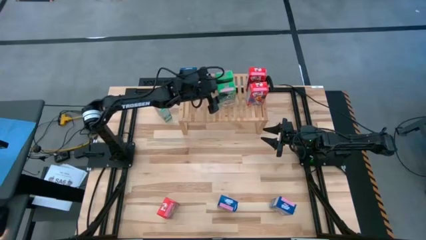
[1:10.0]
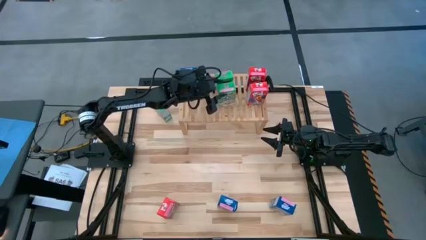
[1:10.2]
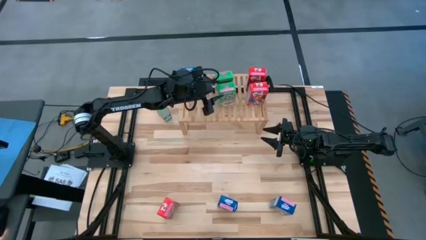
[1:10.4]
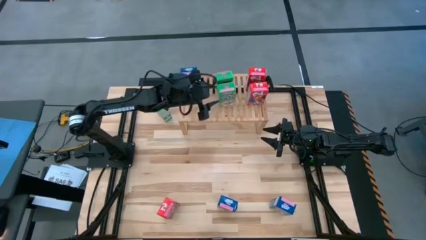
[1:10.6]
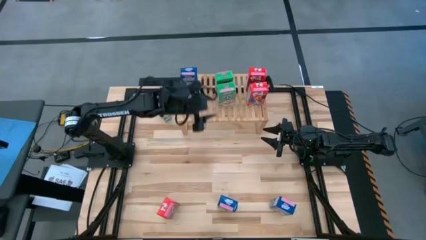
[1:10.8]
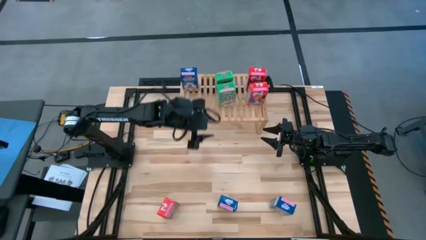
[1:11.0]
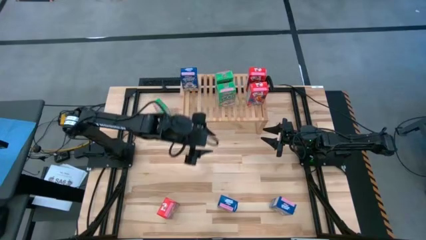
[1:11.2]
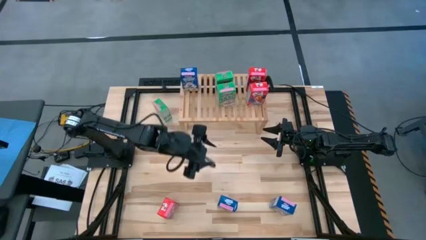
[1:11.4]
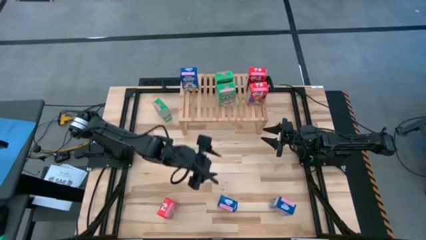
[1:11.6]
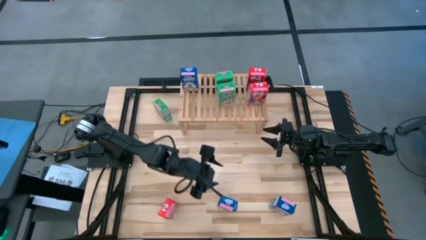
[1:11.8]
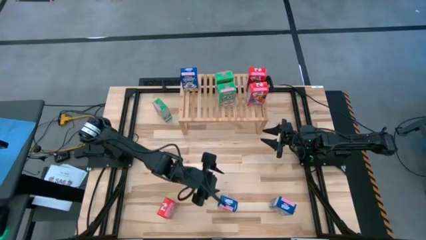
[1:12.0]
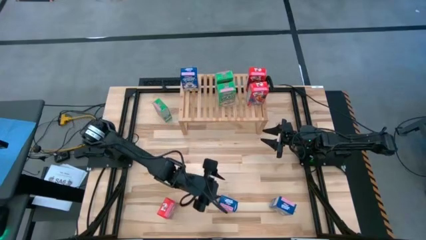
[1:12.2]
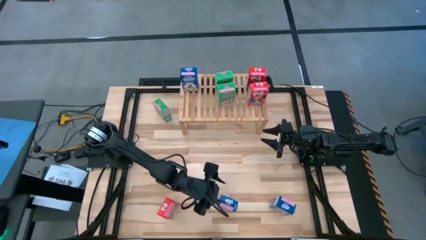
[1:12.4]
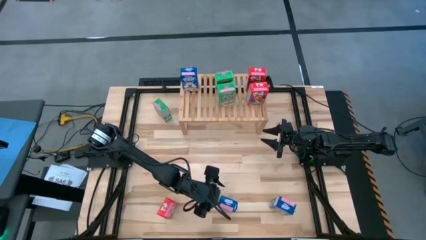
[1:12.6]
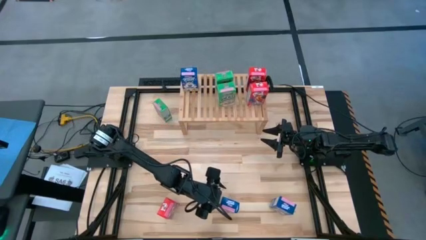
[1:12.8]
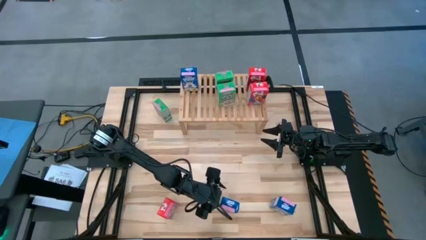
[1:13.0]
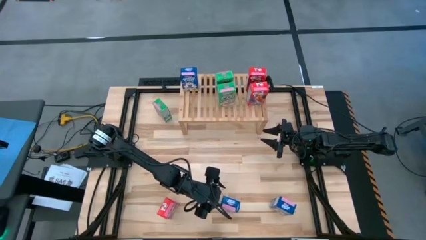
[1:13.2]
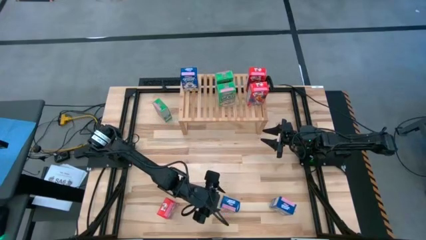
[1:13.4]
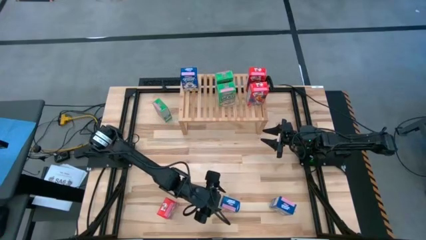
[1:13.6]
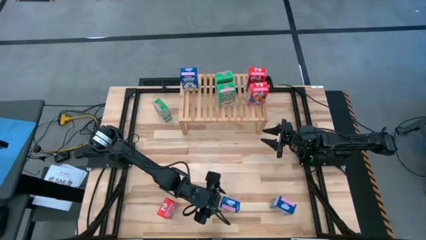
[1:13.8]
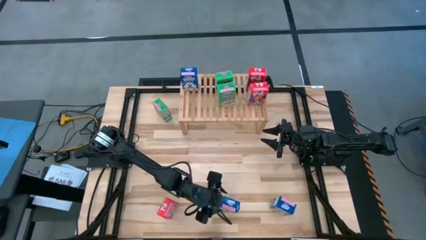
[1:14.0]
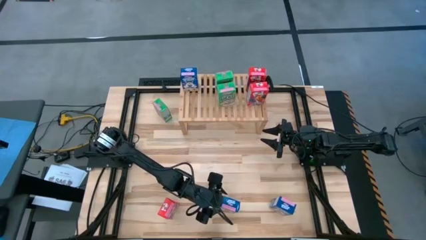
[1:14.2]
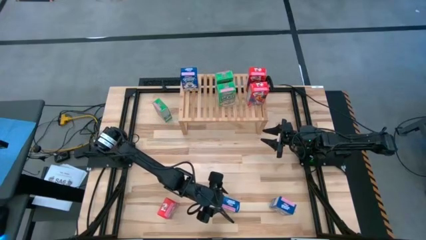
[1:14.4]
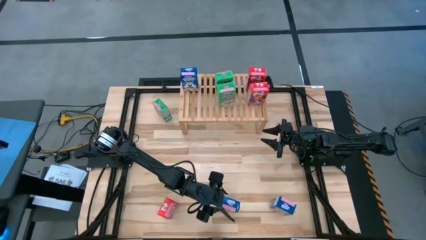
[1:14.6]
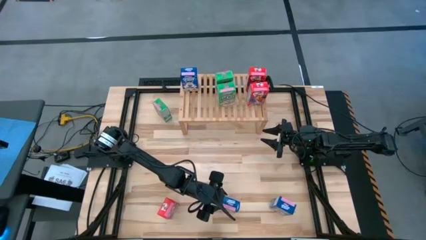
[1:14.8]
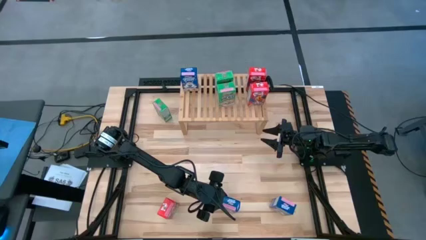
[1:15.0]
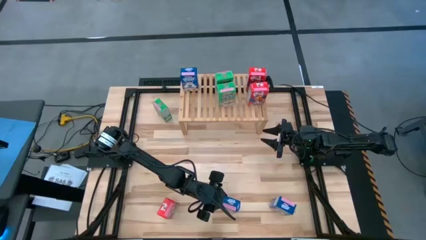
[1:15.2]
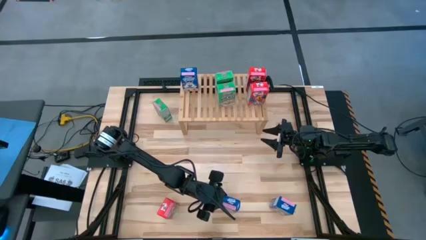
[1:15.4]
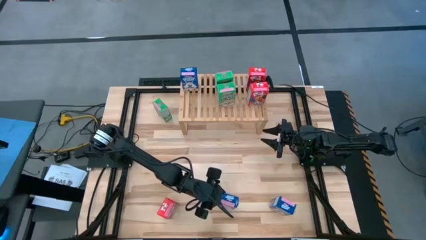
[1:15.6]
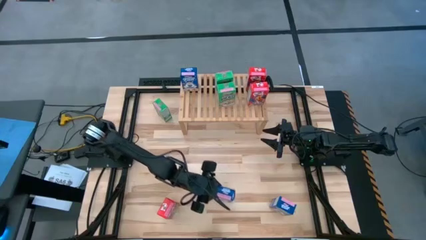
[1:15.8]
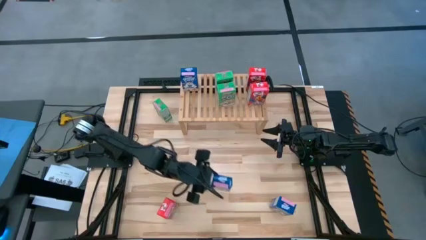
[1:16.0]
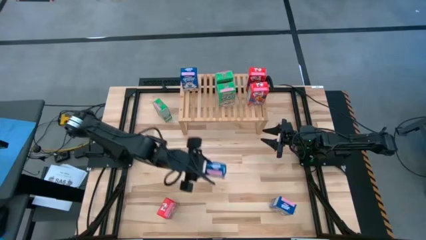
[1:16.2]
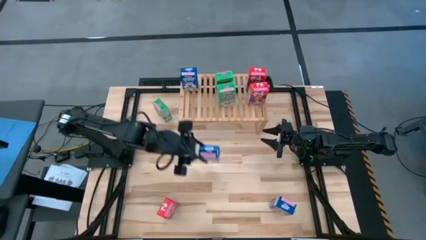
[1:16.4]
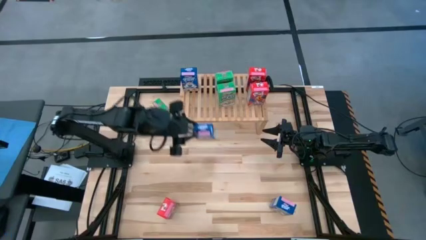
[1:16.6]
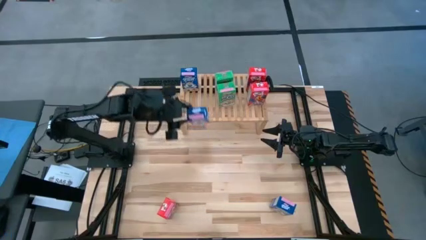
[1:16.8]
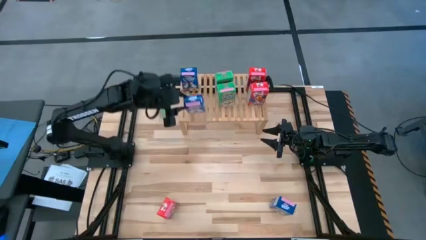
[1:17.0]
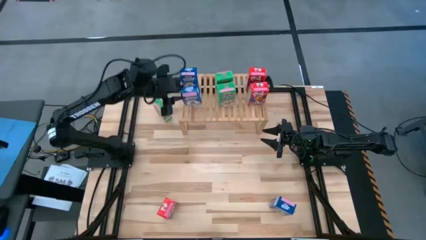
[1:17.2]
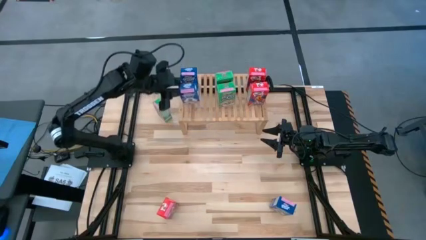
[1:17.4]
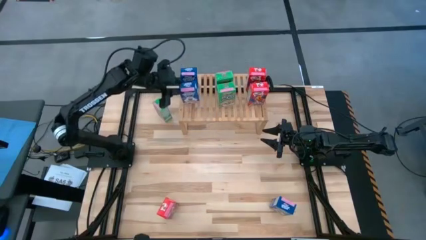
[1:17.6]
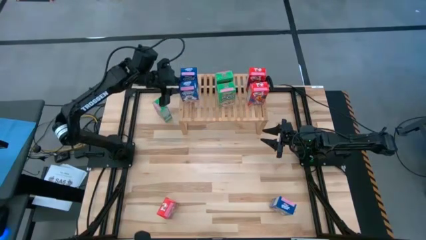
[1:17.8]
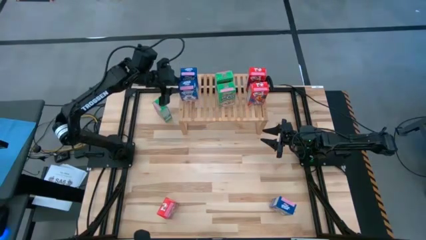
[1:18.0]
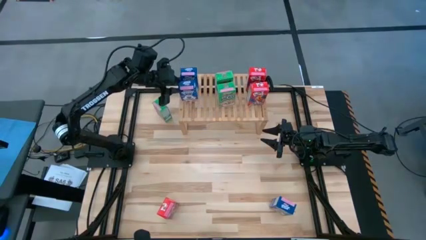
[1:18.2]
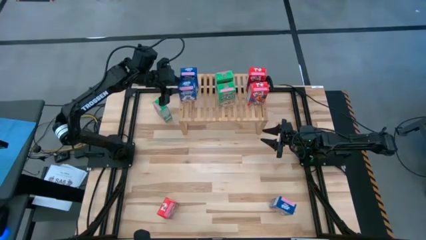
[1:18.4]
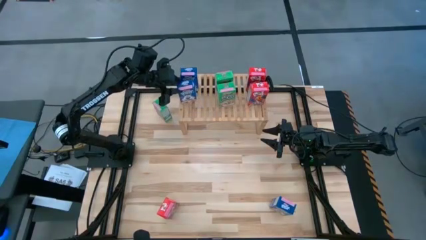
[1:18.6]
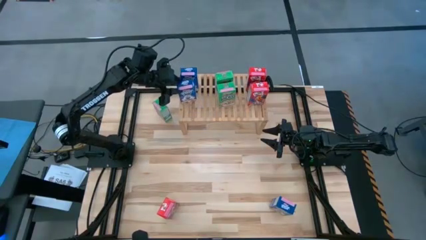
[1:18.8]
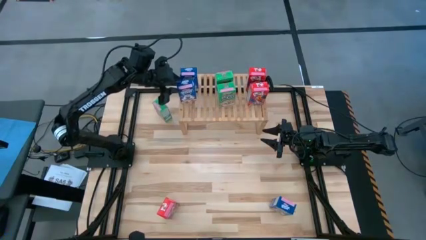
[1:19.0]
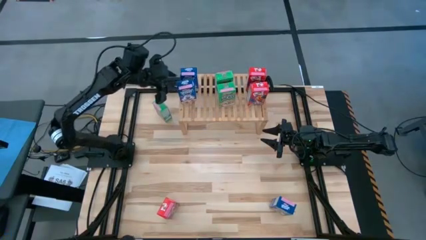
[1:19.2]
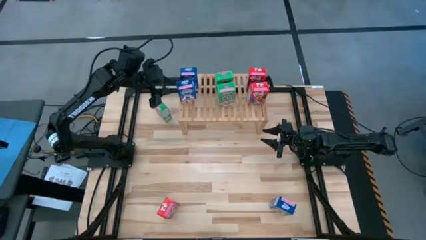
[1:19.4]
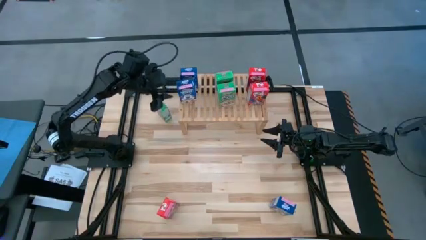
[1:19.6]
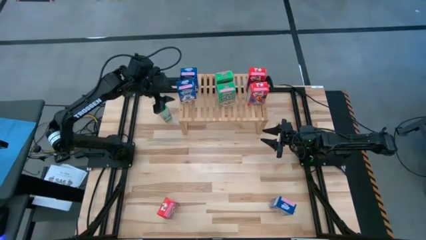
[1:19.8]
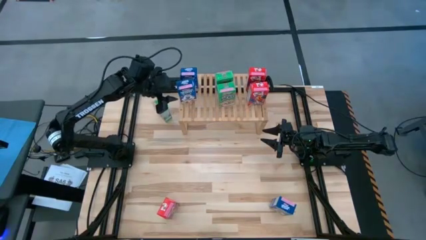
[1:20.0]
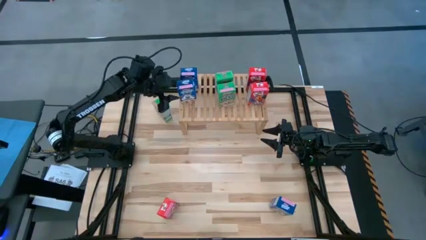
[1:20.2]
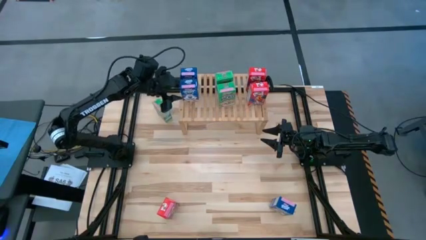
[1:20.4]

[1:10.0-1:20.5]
Task: Stack cereal on shelf
Put the left blue cereal box on the shelf aligned with the other blue cereal box
